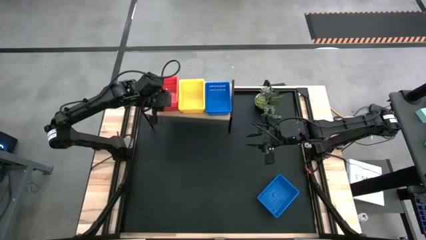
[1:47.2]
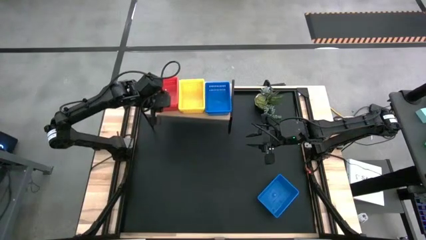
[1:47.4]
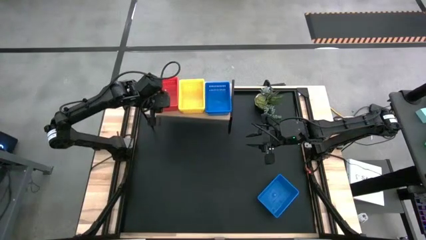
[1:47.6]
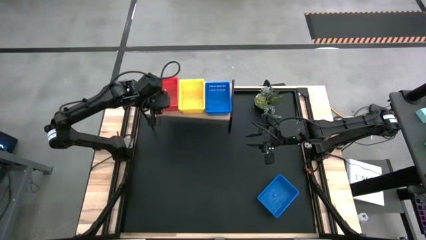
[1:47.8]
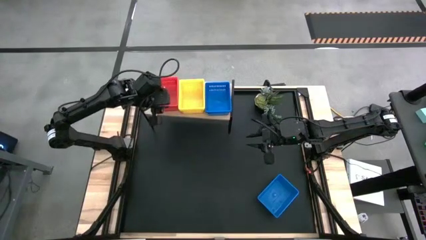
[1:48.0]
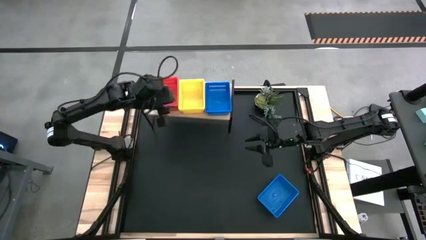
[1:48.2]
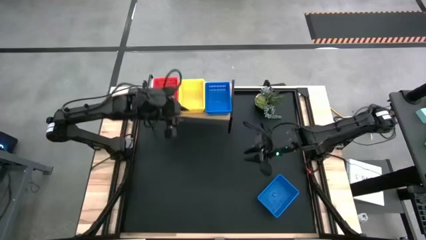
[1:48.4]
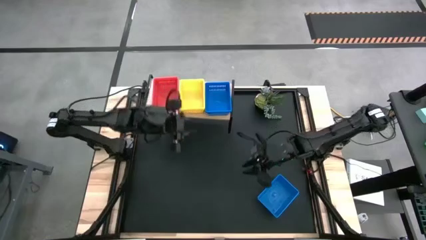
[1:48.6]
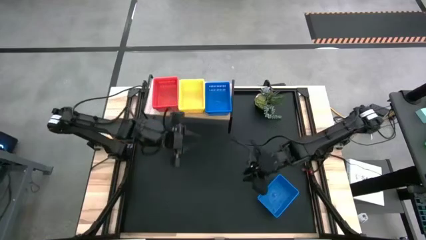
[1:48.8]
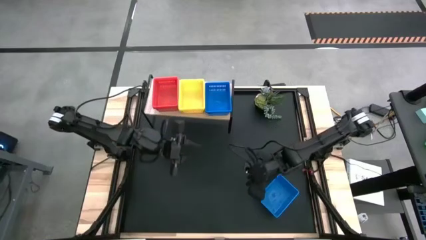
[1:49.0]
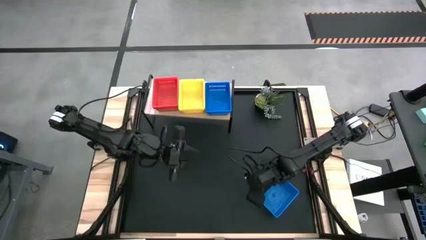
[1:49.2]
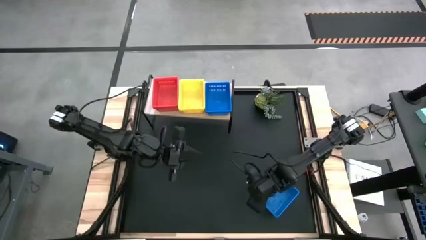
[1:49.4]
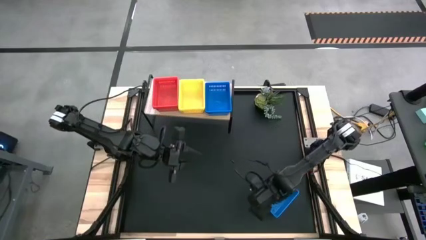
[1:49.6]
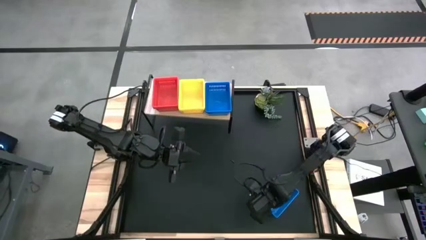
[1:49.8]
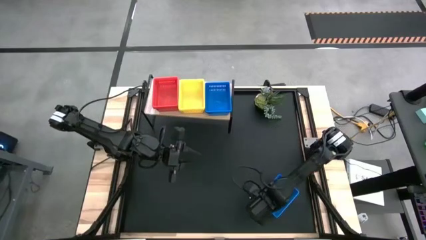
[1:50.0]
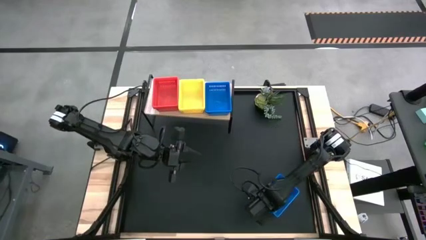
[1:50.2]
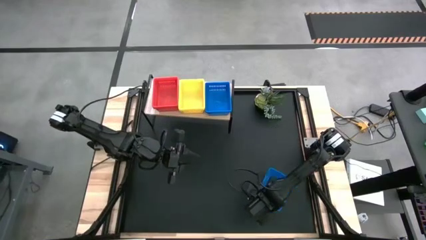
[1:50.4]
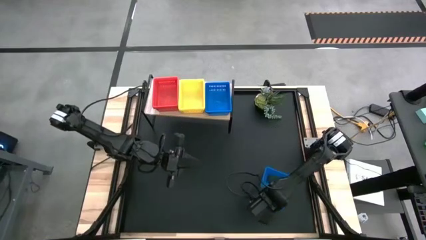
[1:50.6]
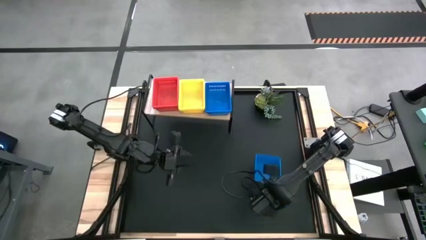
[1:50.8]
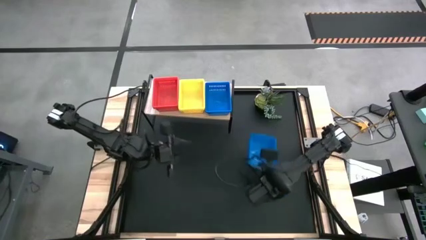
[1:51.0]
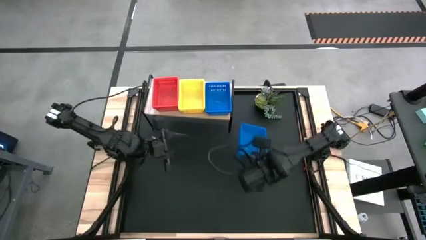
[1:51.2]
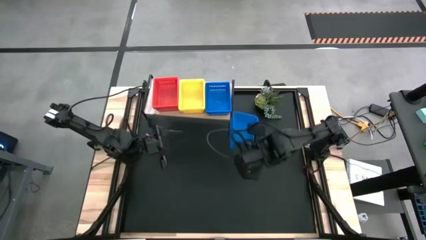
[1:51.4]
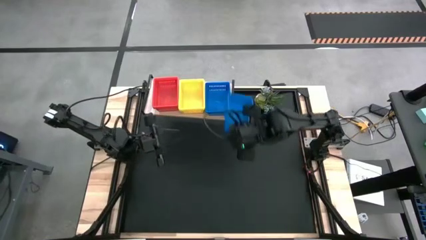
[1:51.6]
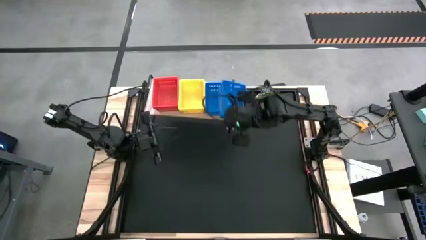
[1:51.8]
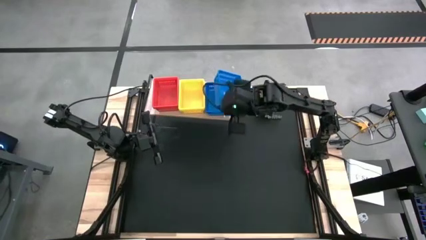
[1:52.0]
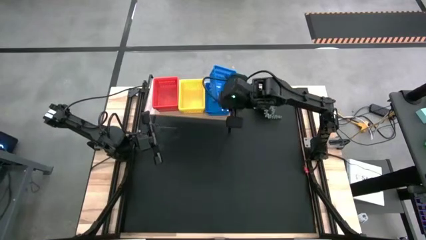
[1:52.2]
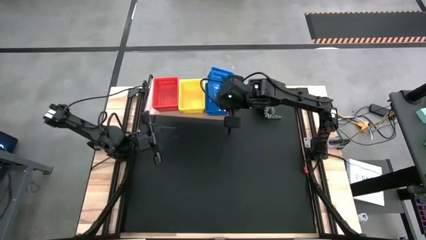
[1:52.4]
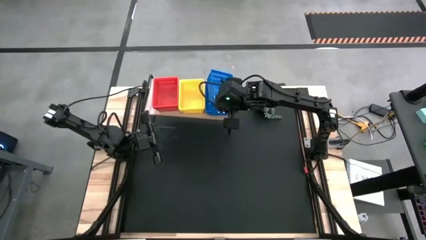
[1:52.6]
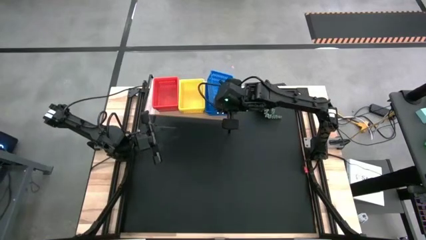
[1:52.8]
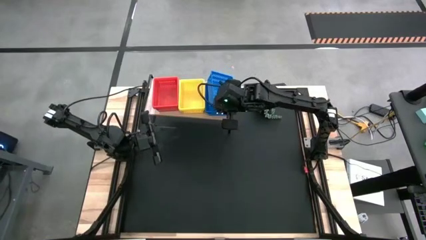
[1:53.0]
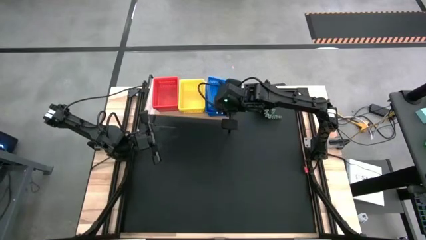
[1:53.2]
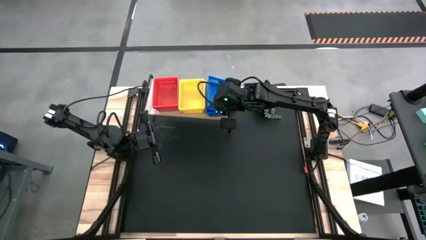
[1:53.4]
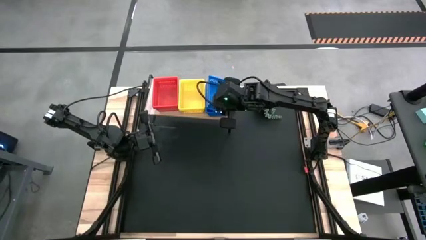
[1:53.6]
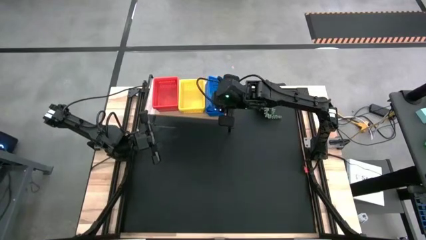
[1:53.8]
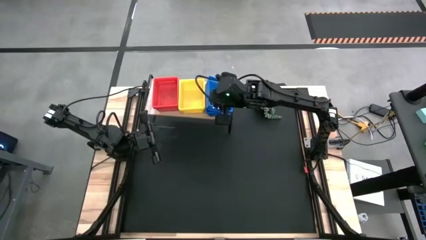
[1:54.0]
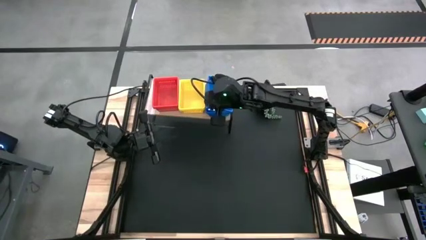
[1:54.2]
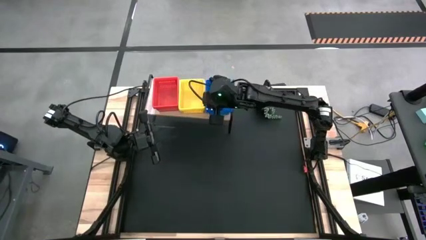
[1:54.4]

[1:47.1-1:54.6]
Task: Stack baskets on shelf by color
Stack the blue bin on top of the blue bins on the shelf

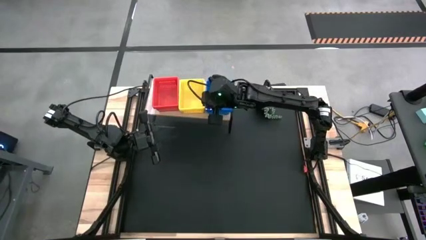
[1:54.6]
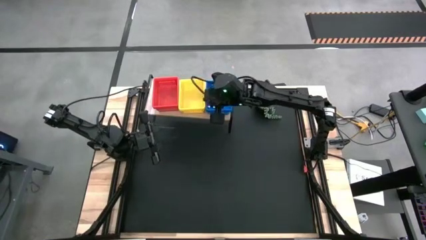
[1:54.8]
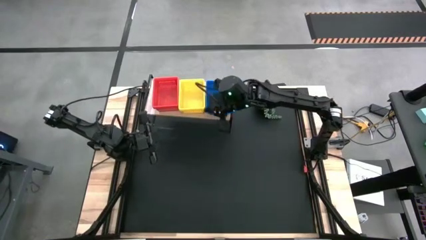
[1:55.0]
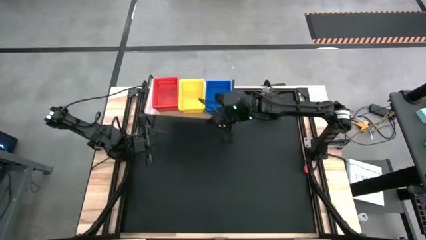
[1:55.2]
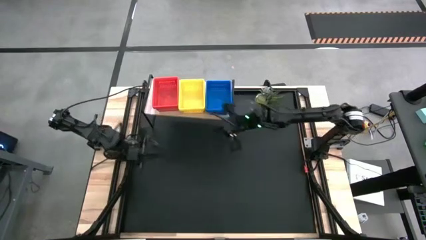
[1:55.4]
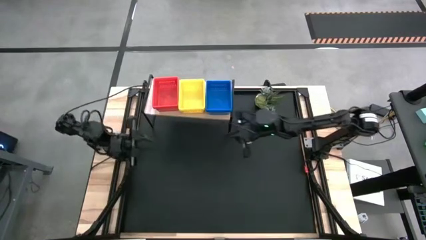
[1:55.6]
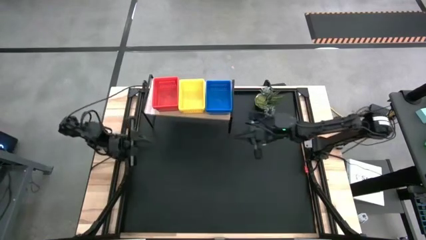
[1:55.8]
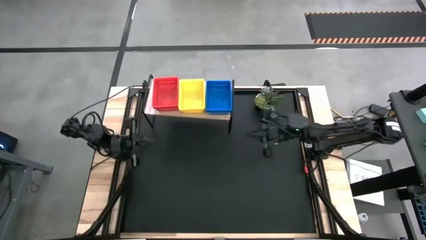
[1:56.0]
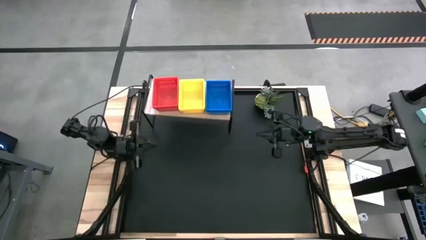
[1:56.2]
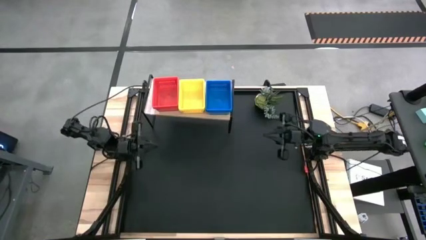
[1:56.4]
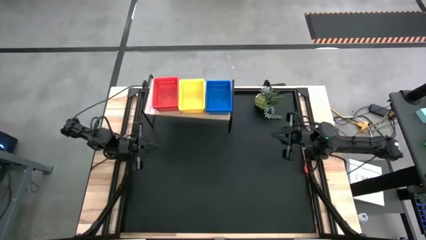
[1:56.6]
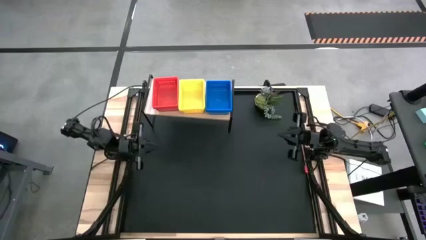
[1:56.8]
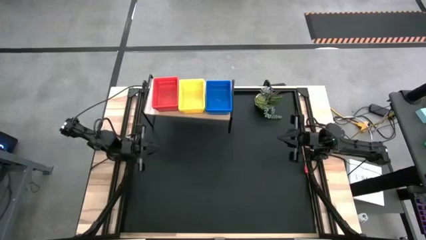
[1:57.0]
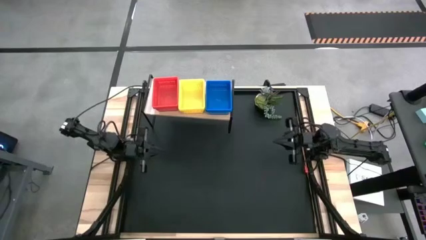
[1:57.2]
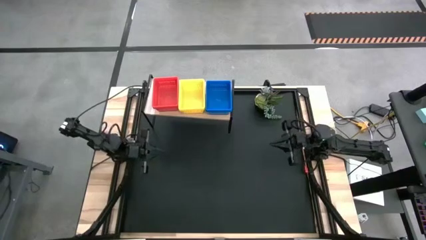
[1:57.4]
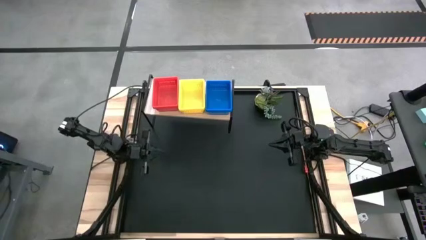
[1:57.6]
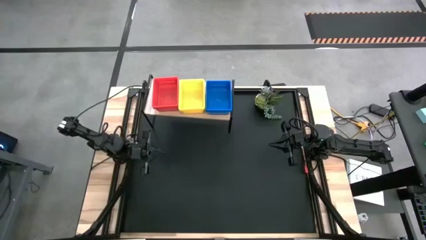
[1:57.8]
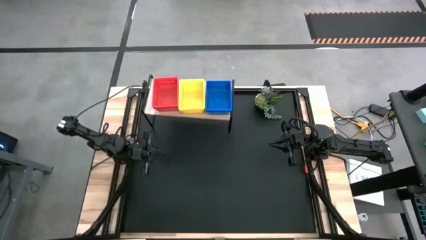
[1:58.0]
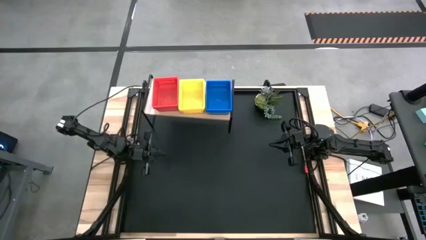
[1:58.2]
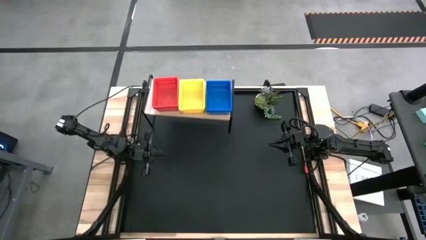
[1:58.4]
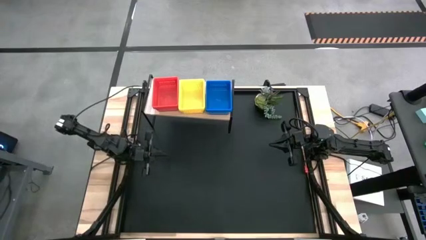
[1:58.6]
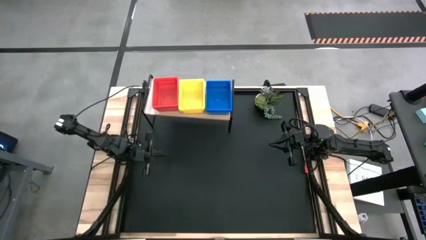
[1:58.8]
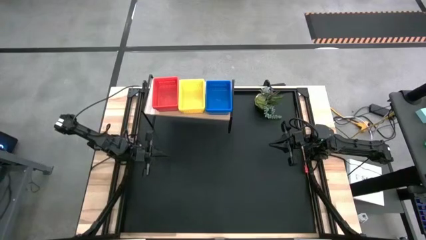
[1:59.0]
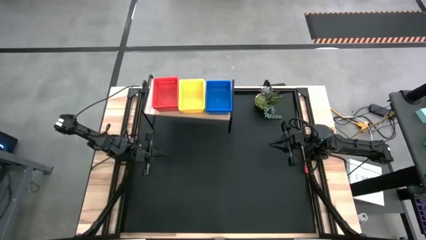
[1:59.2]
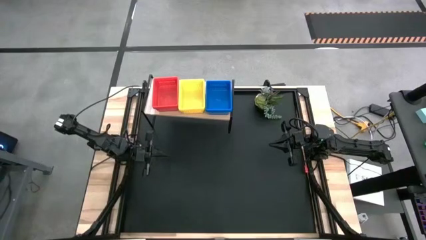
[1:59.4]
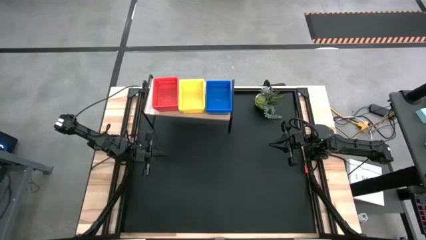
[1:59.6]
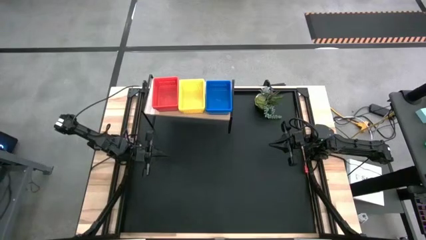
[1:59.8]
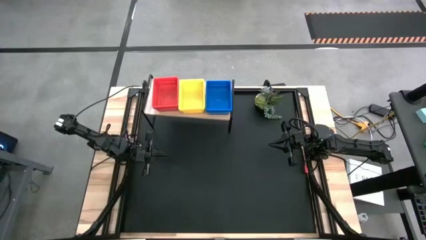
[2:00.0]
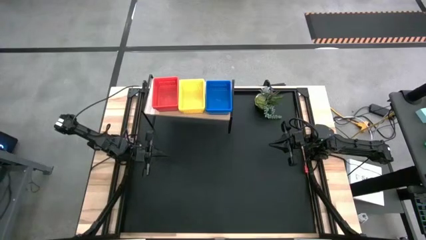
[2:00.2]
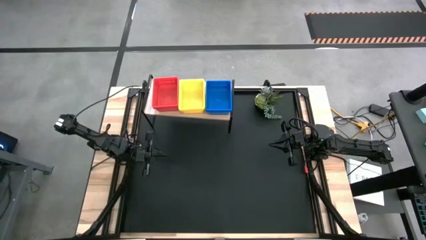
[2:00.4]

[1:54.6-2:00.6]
Return to Home Position
